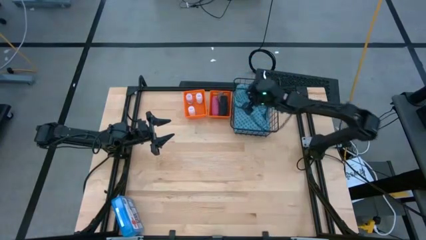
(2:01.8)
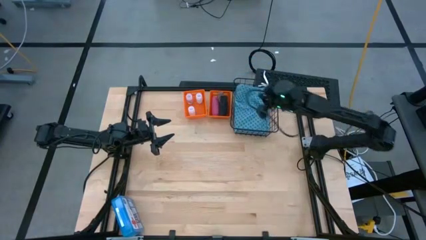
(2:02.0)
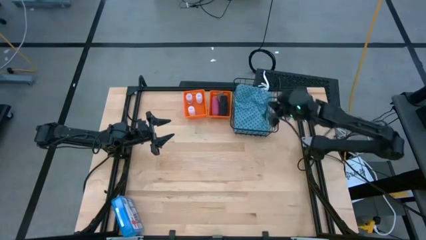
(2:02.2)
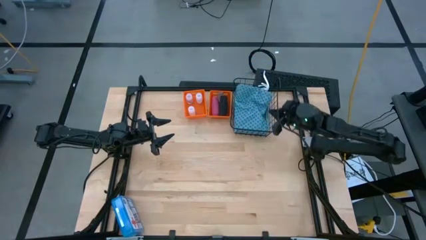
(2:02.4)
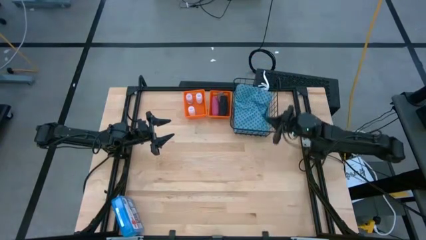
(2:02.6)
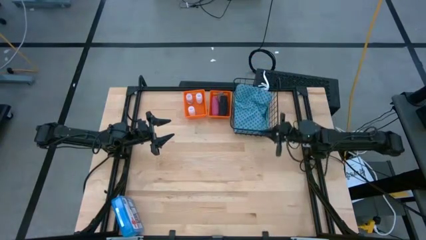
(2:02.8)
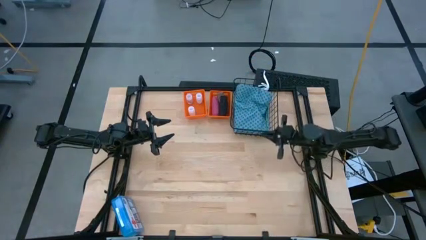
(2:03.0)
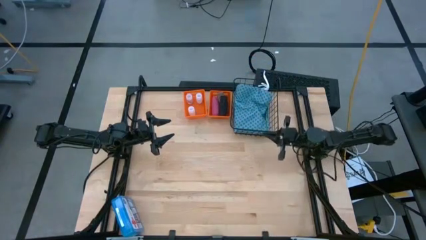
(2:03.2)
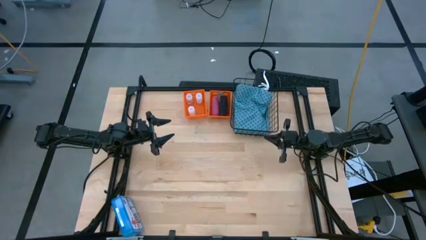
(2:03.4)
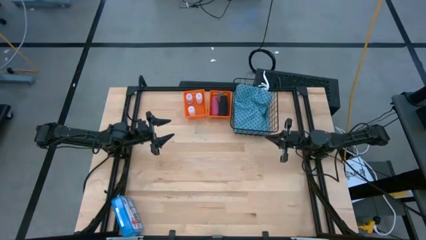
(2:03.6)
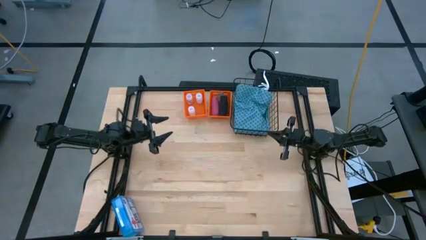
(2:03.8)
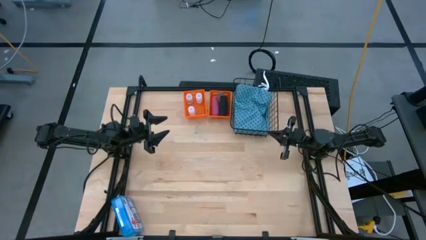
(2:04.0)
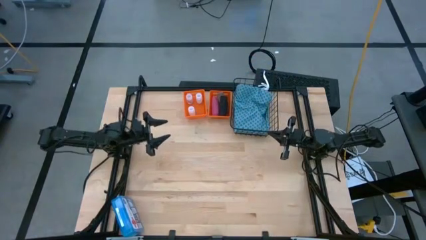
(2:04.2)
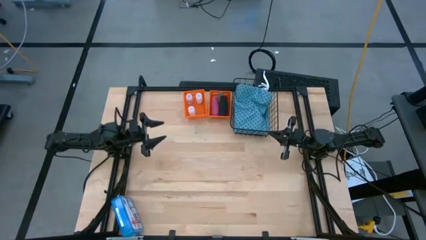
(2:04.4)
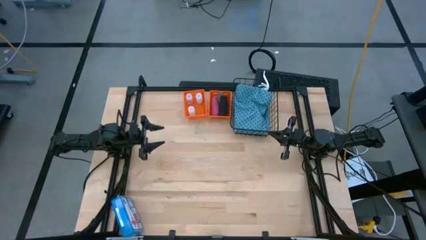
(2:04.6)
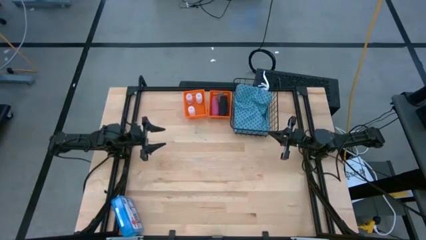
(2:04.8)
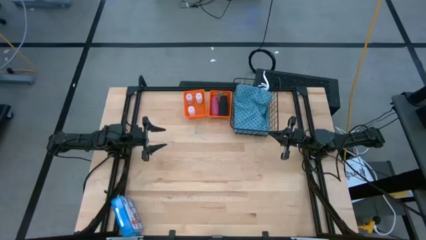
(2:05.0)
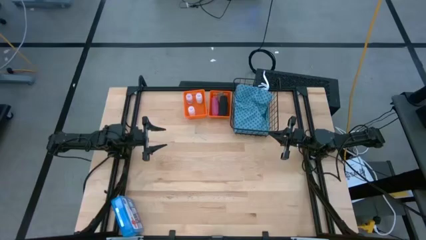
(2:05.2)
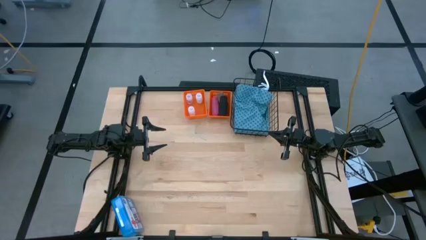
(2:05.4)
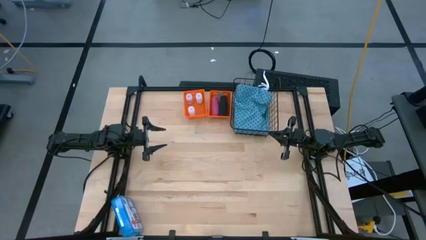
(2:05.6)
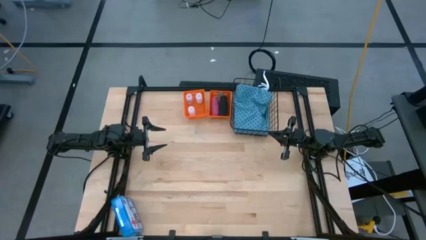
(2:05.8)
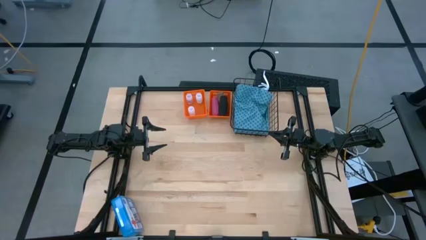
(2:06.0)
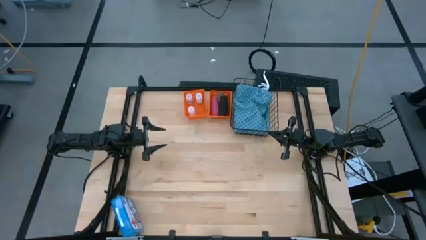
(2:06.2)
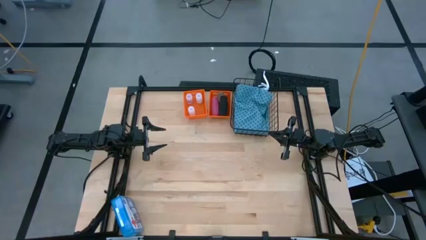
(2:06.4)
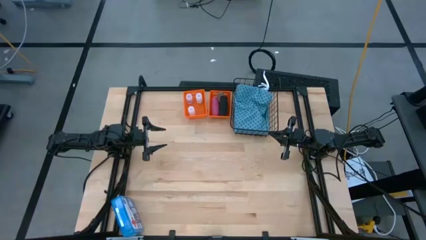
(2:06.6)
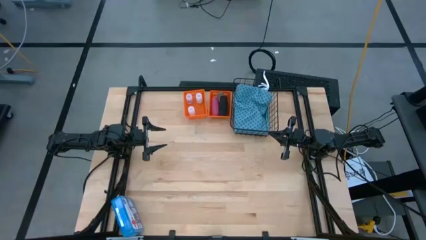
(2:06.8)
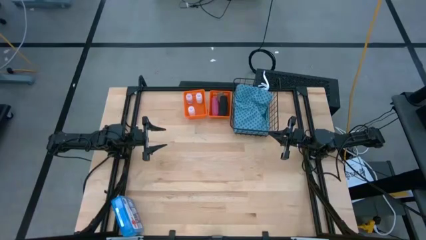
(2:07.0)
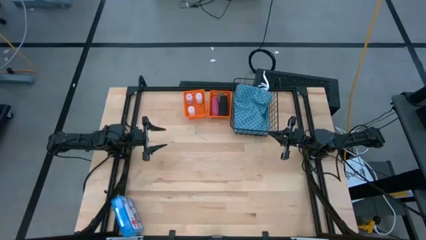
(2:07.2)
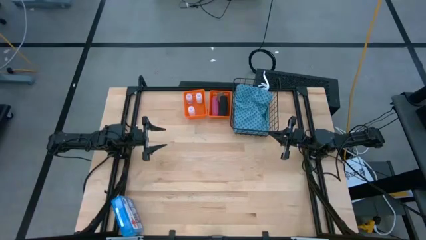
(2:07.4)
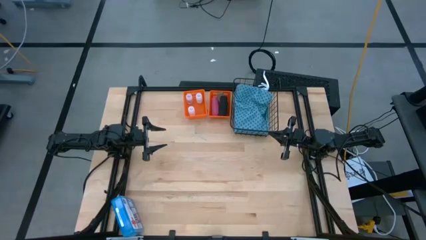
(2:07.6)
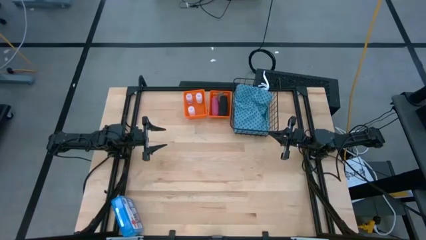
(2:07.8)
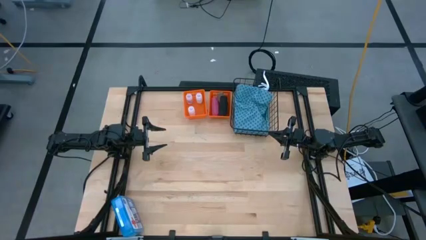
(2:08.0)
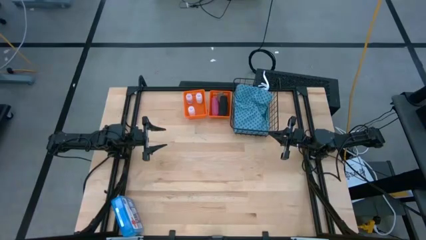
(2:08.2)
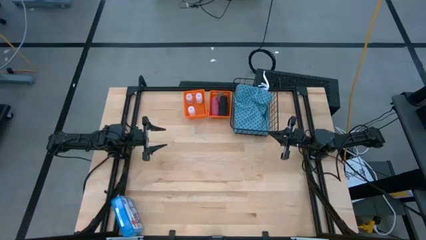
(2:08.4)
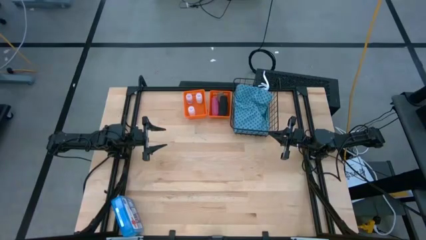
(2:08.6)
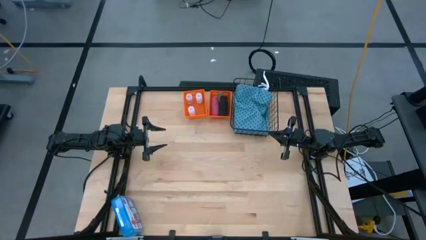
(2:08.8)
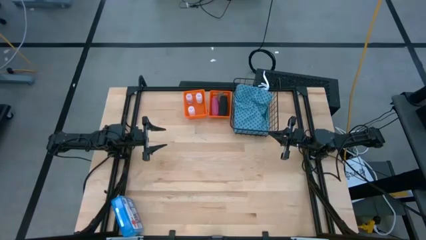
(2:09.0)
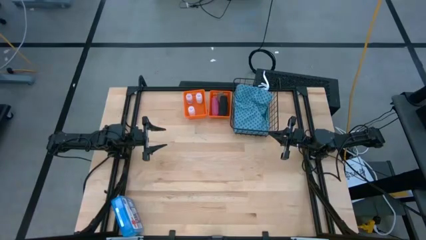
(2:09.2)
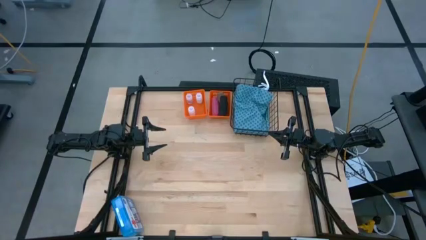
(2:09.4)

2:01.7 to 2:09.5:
Task: Pick & Place Medicine items
Return to Home Position

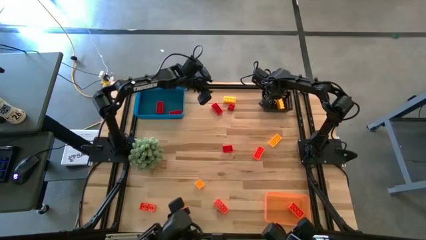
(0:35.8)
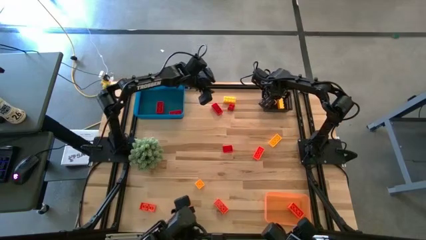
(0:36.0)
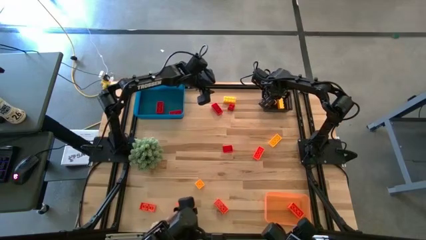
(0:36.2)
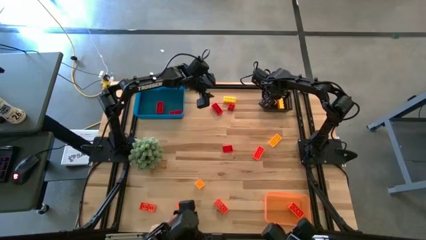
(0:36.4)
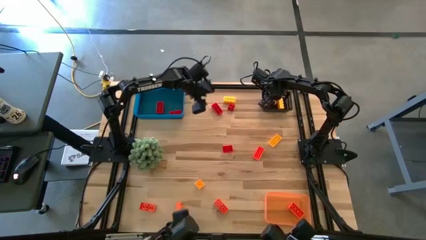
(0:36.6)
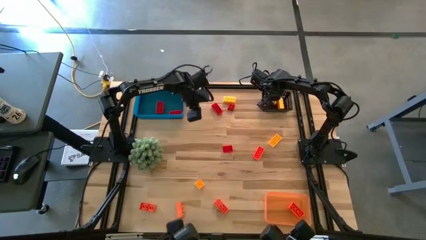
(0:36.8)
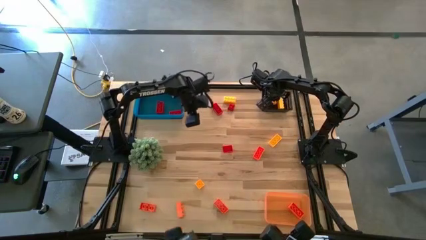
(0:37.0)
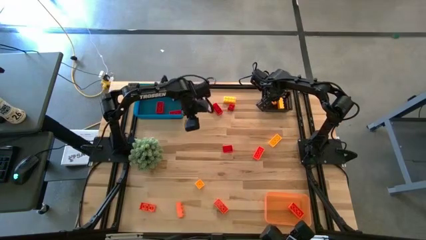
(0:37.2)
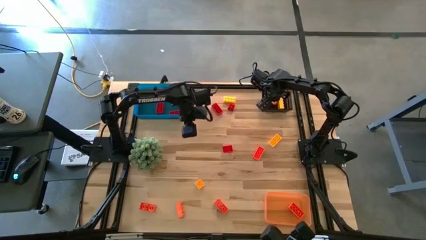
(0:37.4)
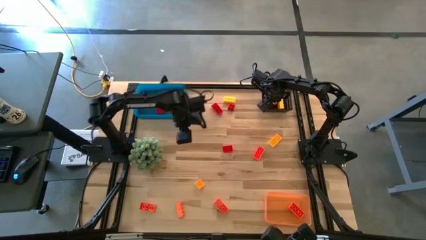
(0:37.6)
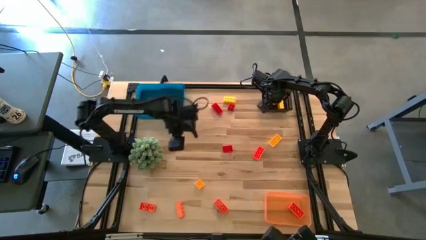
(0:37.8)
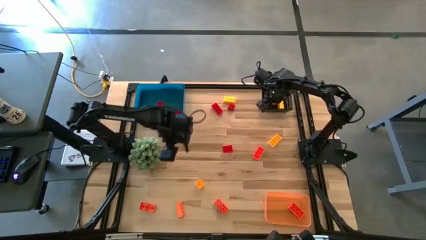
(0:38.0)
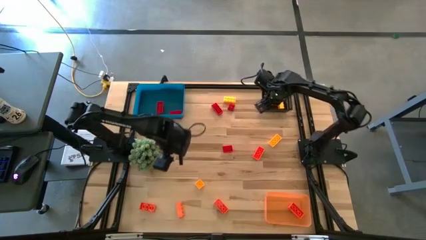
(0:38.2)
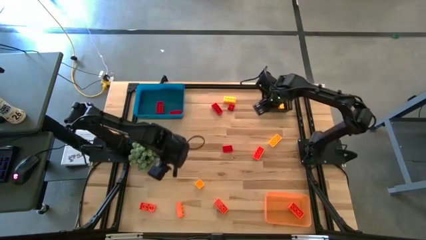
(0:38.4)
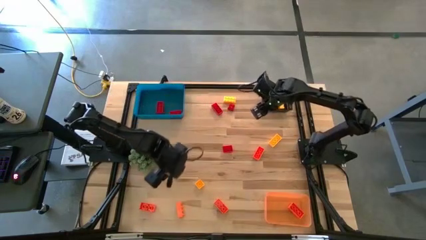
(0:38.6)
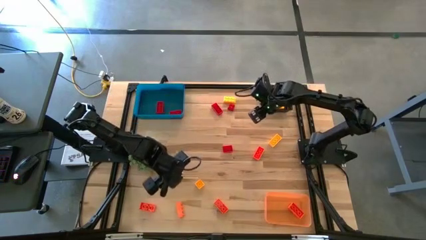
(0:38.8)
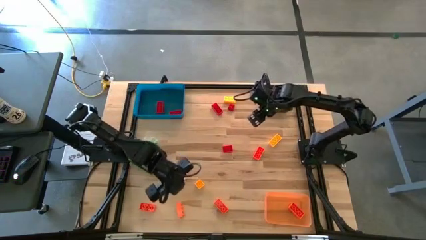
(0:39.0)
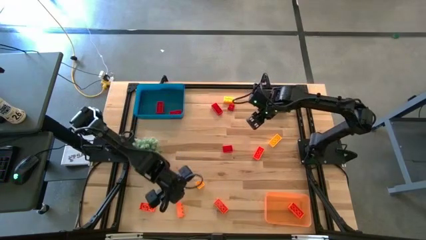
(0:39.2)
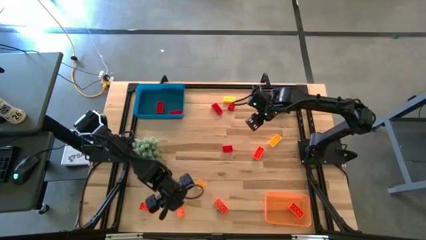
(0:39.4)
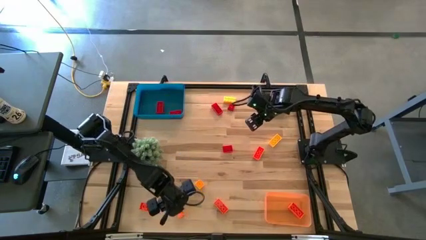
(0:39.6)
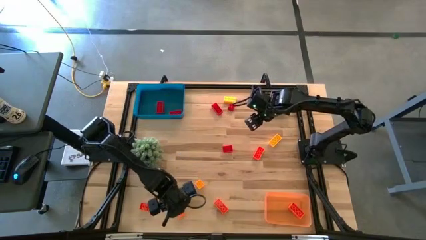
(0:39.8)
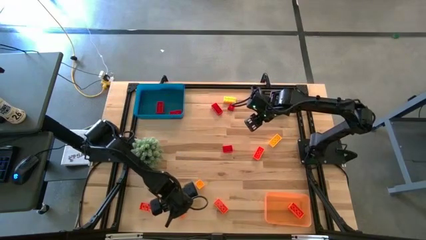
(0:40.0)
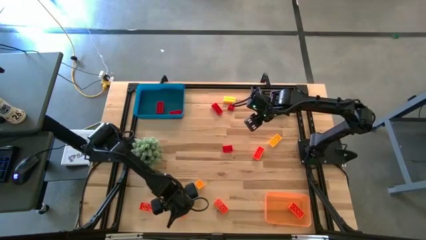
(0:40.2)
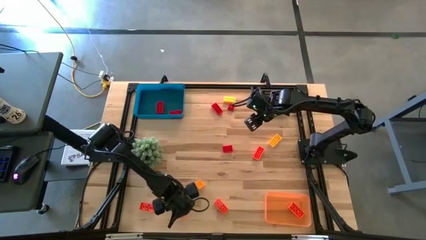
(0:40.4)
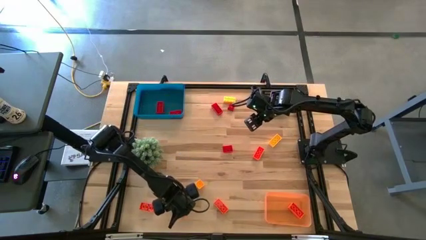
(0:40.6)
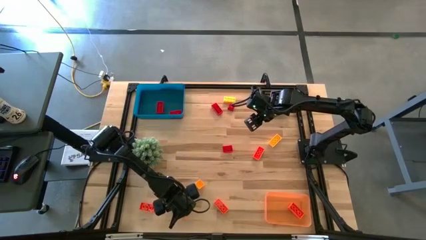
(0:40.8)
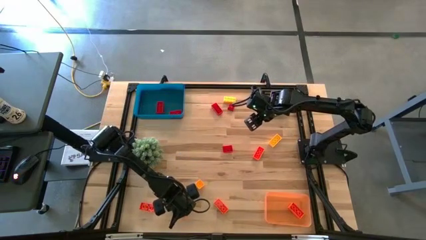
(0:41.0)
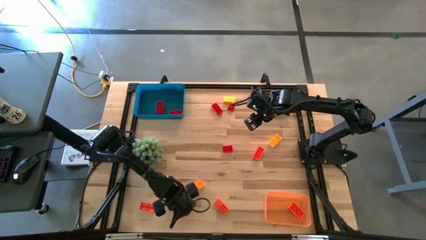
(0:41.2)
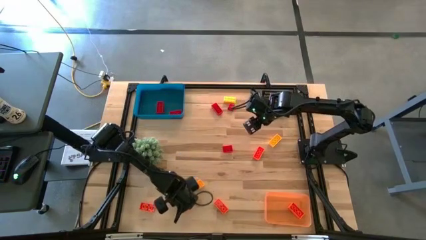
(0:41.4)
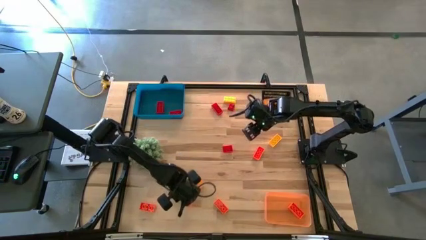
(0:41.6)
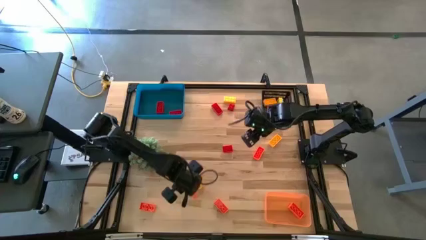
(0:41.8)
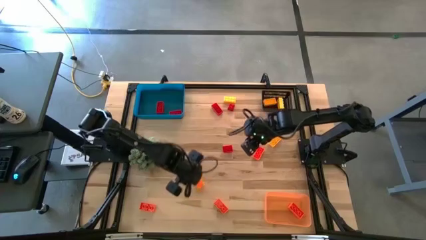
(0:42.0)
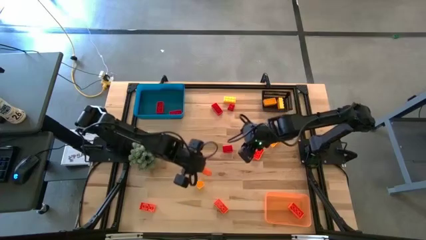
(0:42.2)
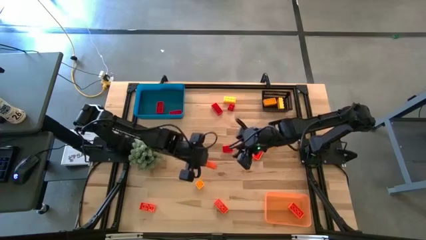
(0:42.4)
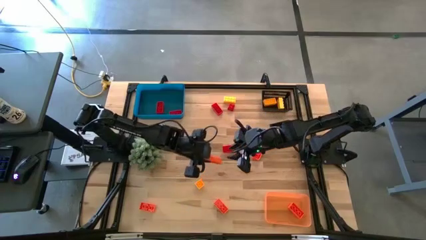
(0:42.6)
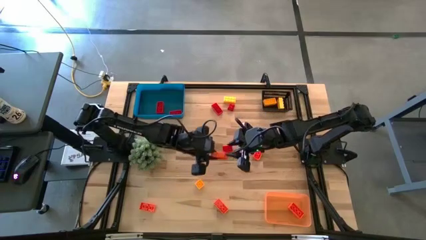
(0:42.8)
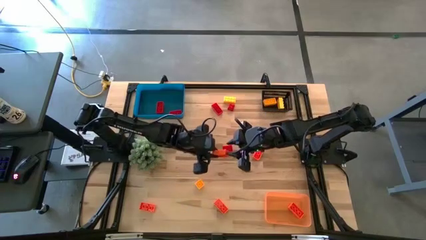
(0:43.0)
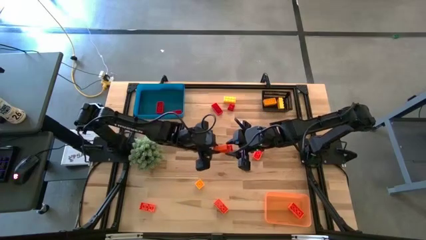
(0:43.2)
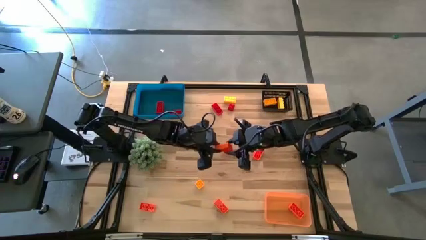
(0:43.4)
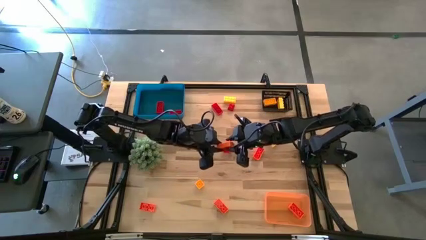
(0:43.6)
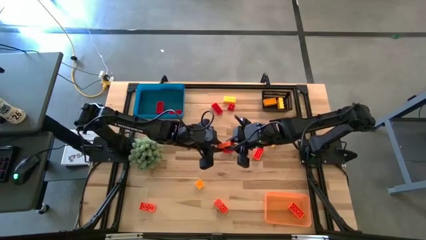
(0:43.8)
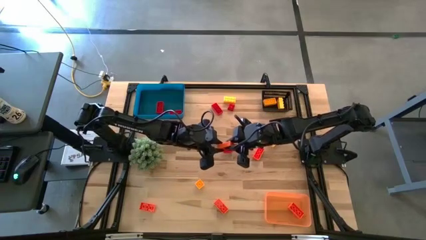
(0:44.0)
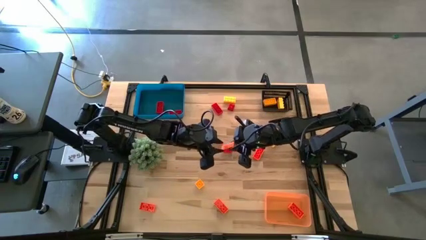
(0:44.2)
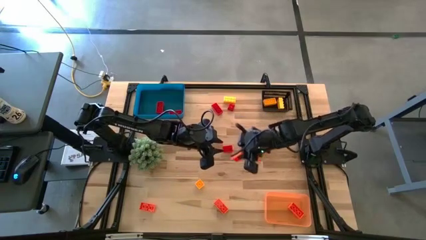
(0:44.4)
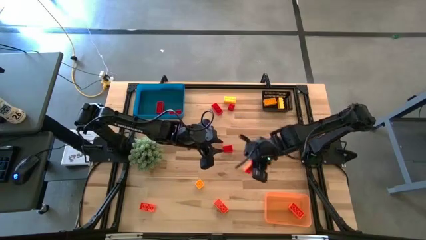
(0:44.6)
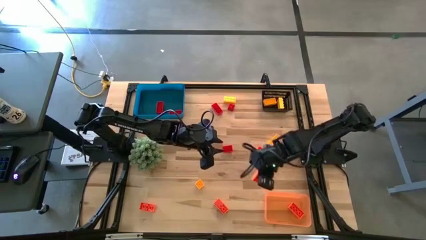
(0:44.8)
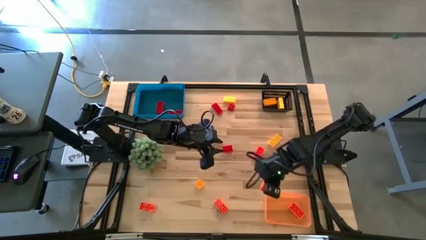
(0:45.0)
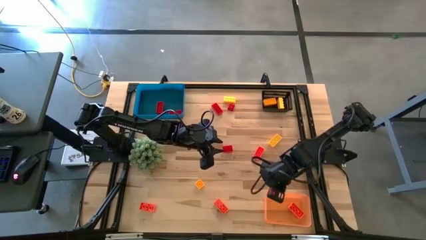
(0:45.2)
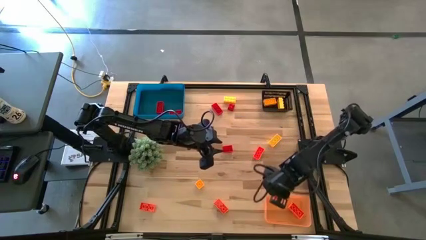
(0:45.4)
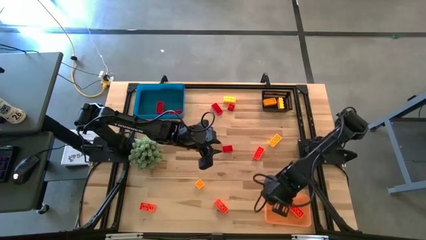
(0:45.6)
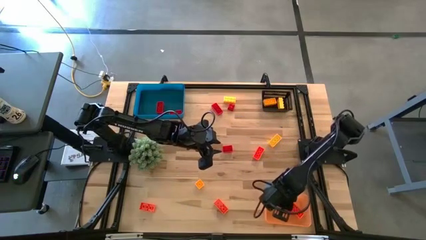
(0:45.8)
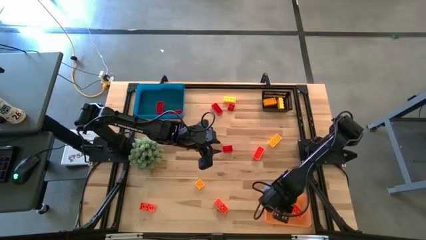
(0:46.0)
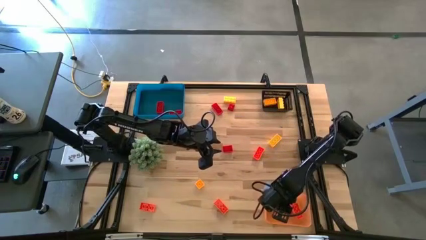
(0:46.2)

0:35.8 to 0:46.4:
Task: Sort & place blocks by color
Put the orange game piece into the orange bin
